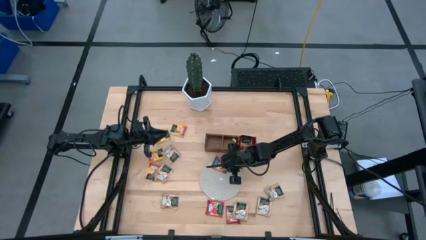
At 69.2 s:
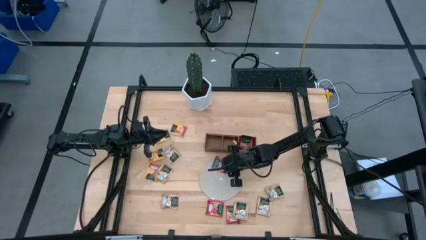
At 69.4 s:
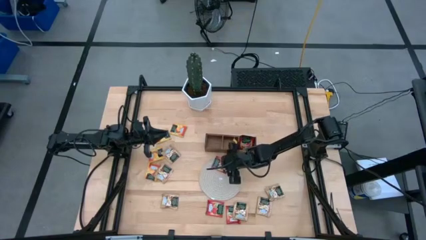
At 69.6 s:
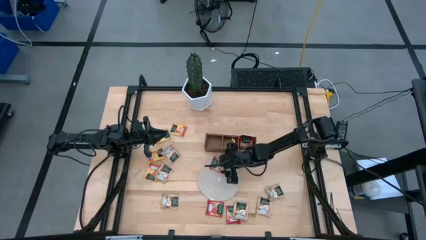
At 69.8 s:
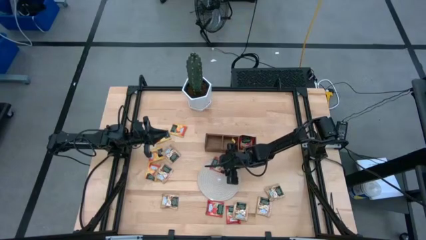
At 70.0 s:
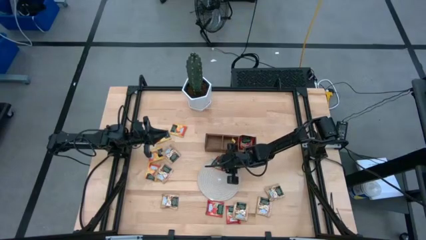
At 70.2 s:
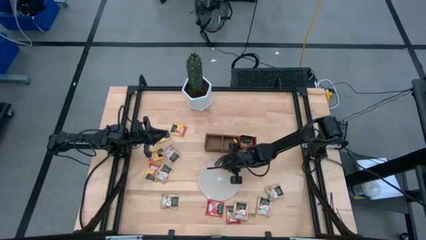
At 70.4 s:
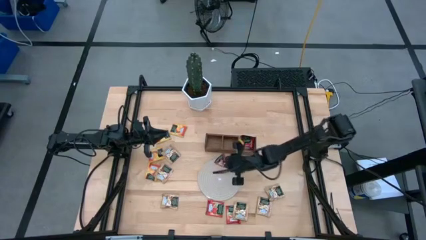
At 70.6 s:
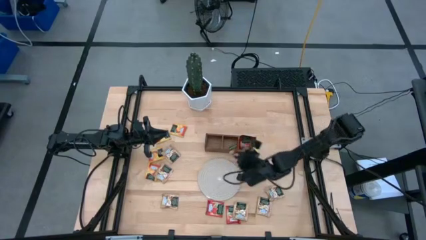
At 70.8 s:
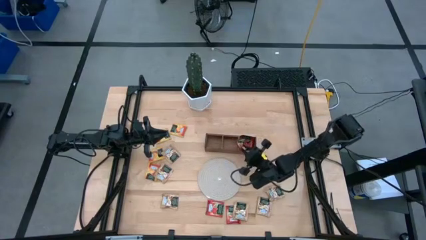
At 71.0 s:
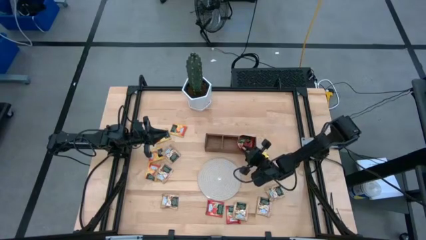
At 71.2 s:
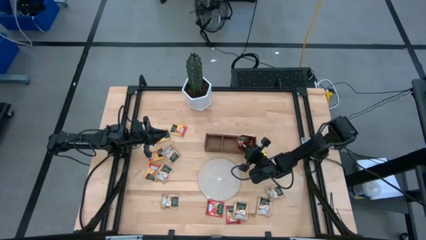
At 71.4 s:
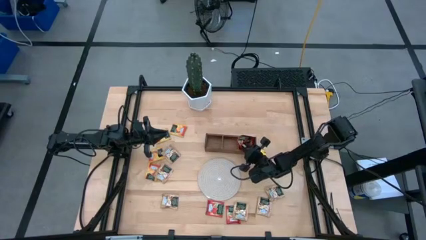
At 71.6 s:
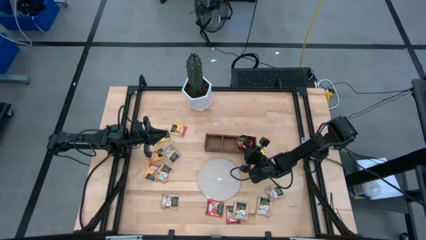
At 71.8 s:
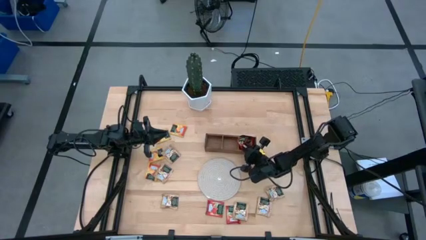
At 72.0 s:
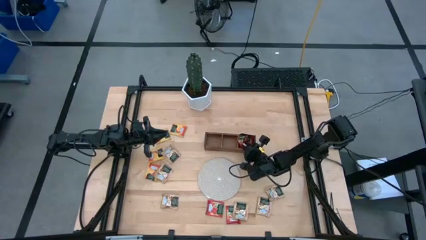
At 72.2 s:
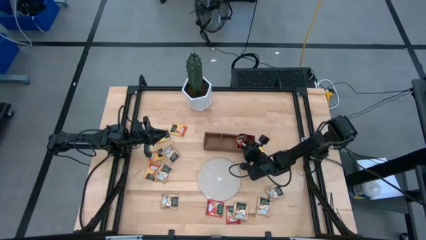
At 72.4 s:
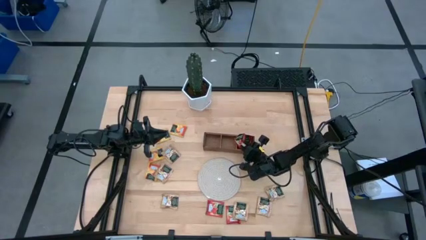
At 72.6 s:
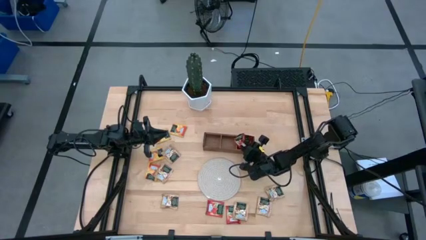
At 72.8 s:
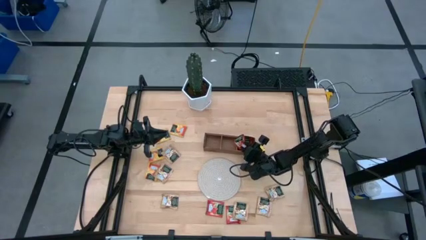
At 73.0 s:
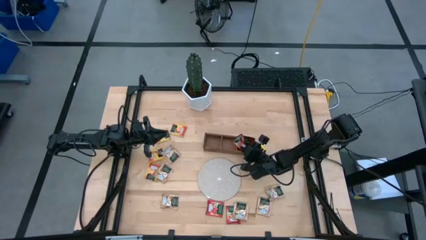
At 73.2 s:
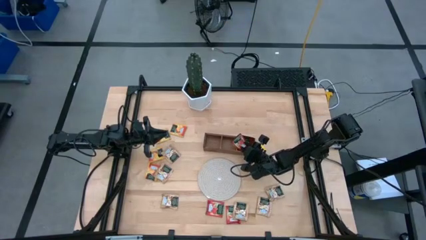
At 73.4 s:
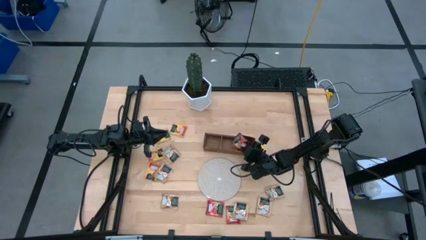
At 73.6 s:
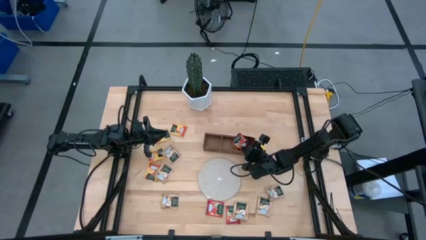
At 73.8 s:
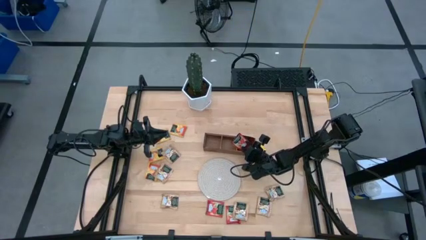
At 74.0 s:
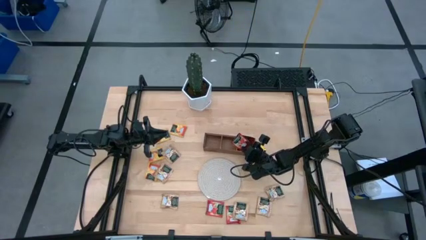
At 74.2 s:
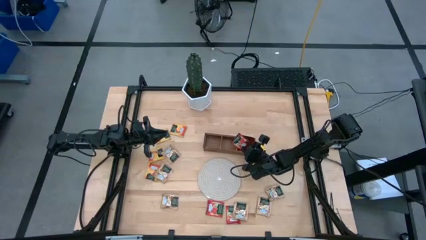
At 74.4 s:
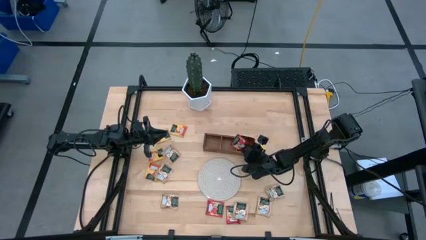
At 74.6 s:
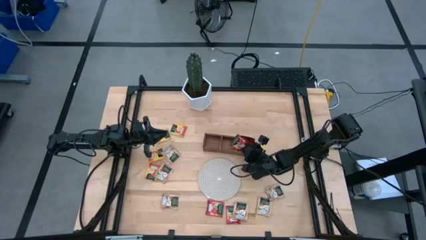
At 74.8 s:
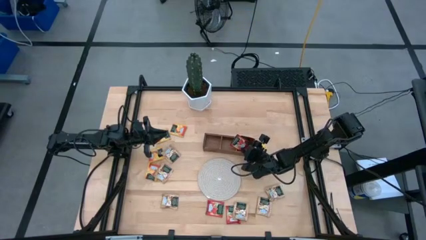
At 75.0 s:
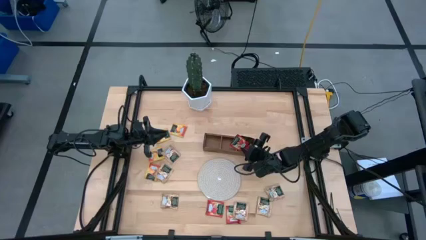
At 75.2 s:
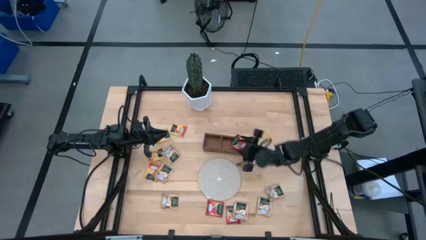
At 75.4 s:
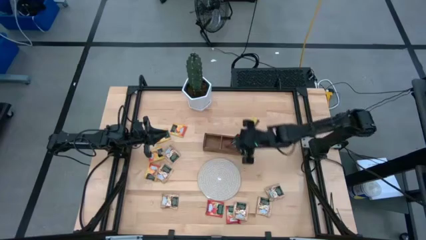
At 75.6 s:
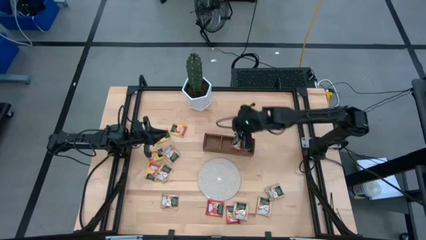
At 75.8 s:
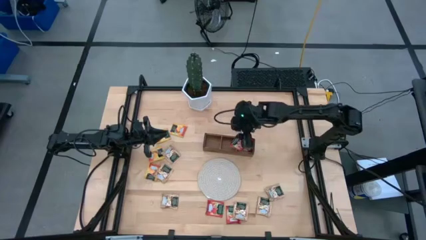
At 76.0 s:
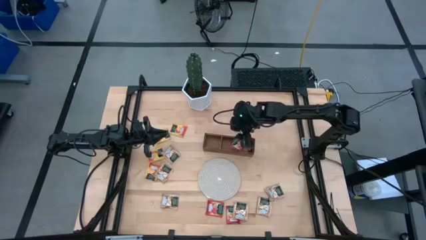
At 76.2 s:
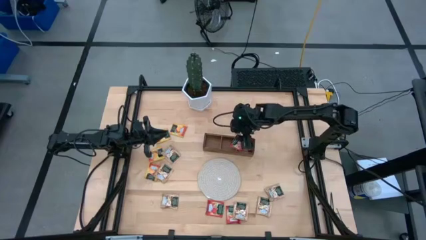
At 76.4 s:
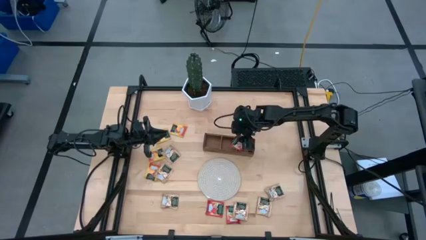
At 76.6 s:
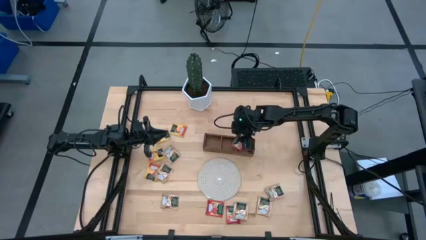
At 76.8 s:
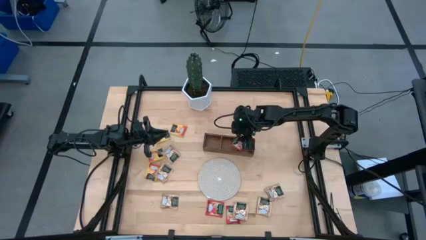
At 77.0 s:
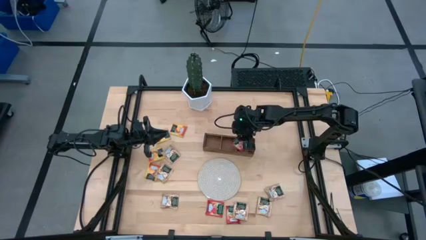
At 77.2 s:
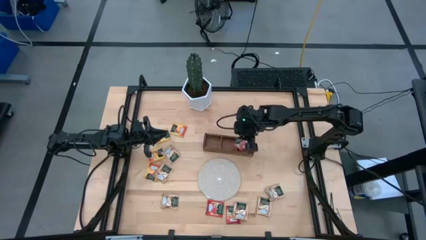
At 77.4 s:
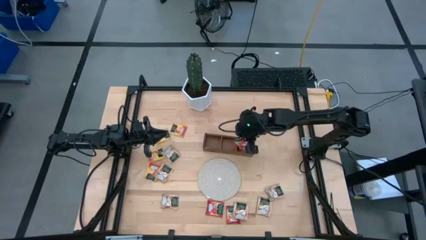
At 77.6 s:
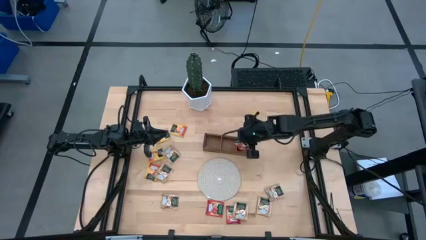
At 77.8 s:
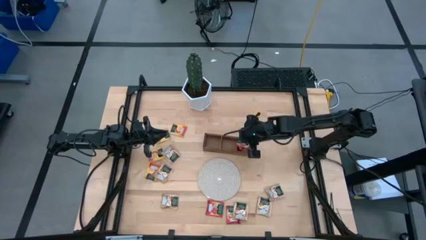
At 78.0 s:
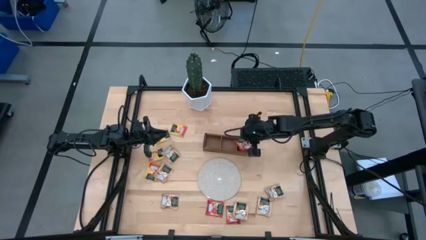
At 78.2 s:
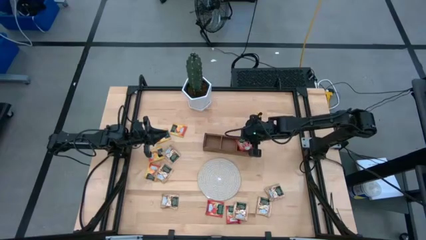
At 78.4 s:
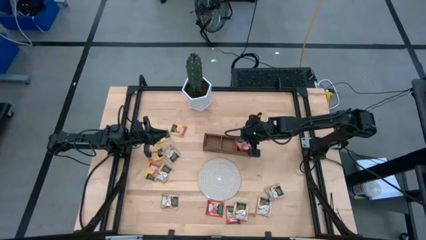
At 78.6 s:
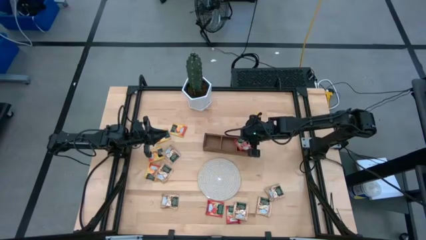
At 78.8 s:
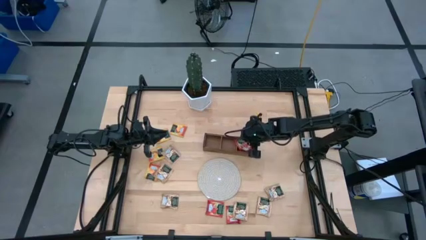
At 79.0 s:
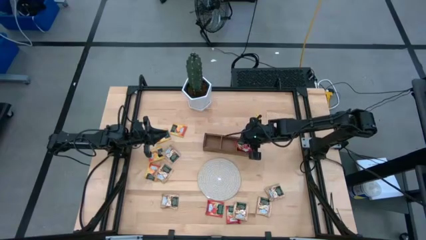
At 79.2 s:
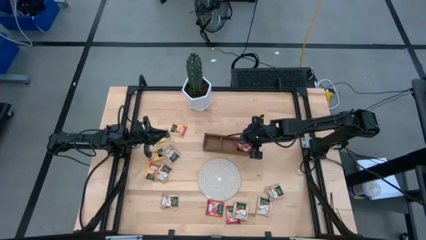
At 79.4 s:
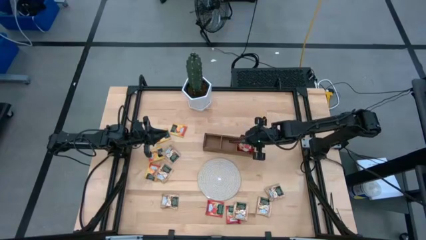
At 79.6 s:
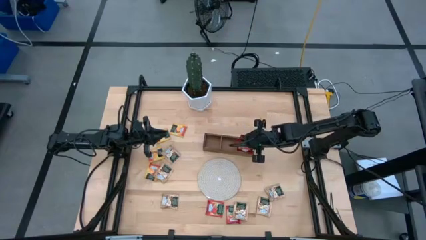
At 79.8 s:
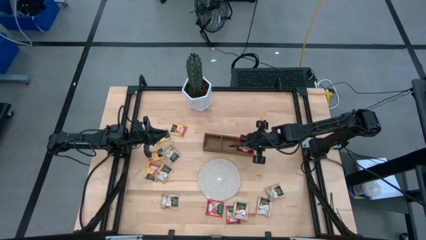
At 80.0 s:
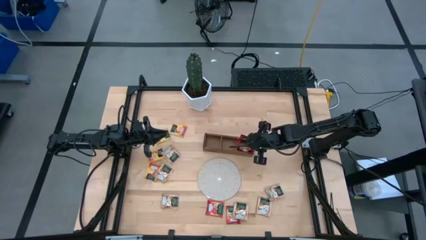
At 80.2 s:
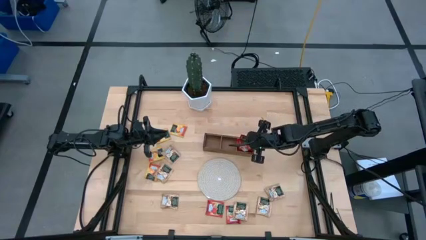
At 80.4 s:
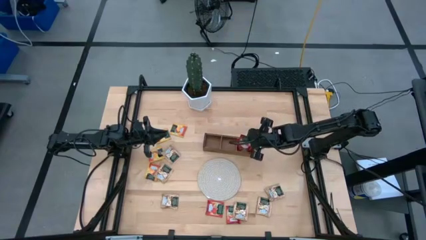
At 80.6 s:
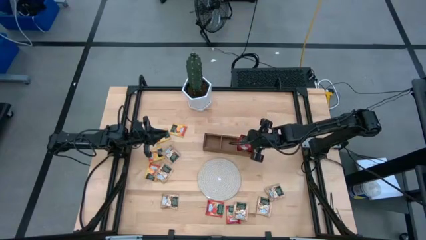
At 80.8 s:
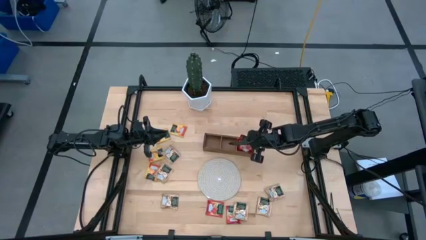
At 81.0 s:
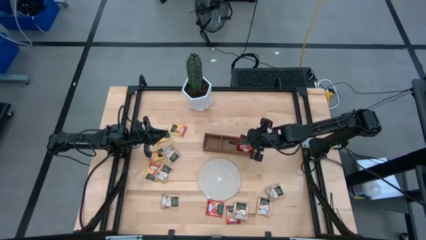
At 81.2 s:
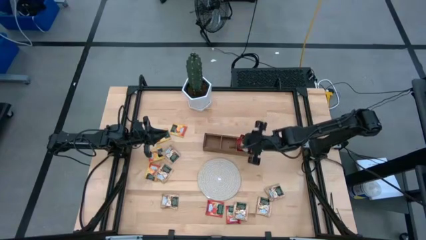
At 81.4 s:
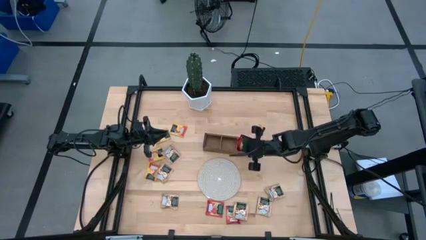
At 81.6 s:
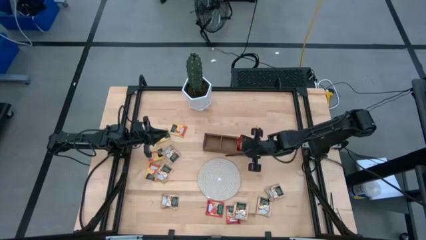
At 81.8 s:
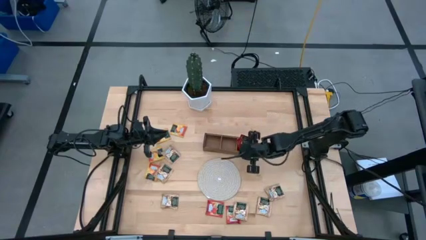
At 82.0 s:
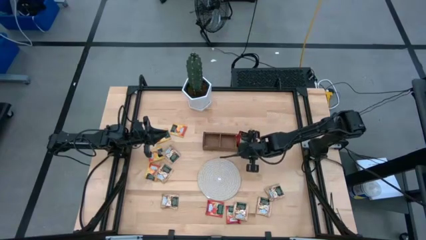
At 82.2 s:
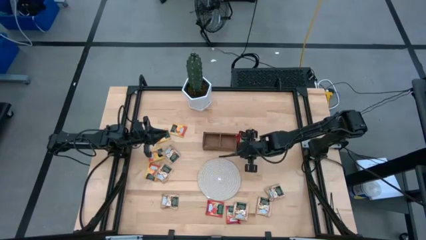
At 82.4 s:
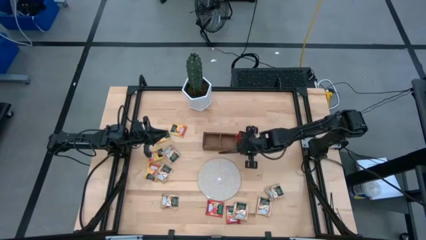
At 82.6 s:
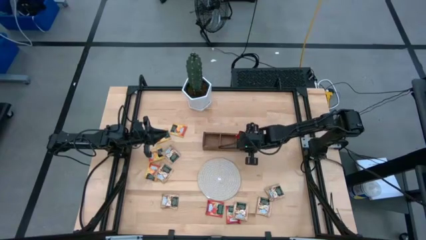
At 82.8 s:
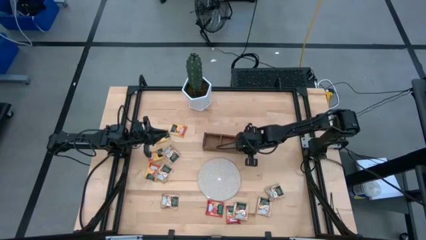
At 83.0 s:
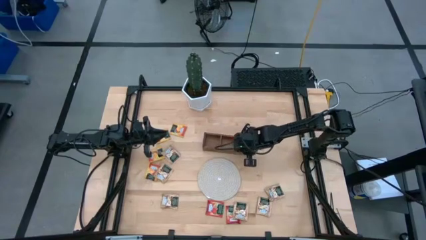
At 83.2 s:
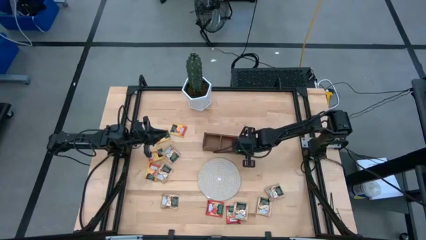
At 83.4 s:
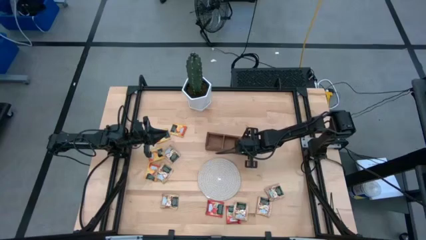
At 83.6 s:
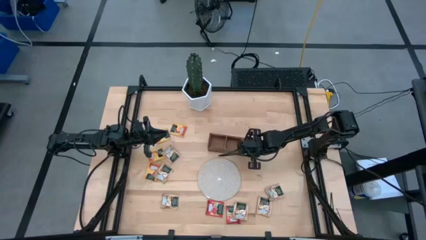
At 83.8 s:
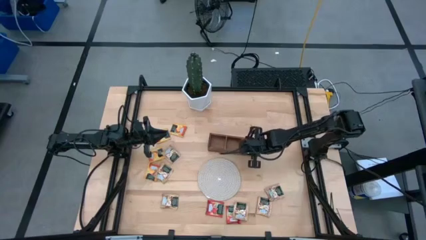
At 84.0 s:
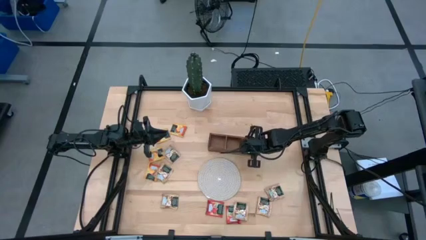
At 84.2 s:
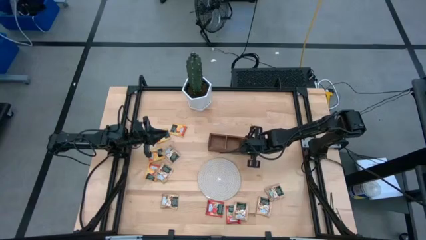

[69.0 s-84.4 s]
Task: Pick & Place Tea
Put the red tea bag into the right section of the wooden organizer

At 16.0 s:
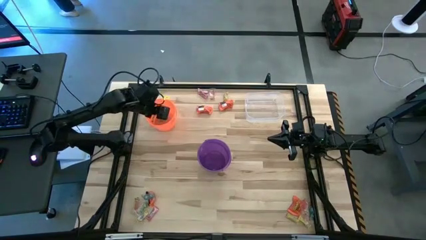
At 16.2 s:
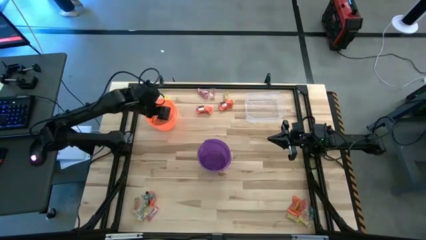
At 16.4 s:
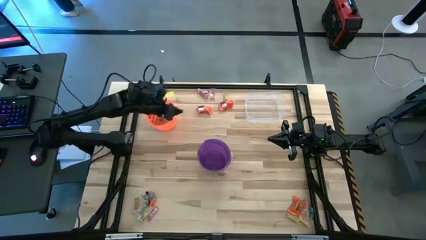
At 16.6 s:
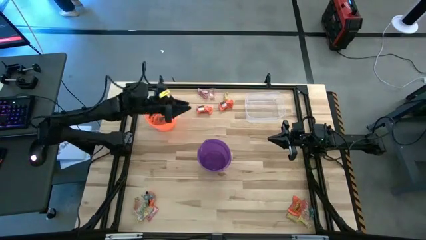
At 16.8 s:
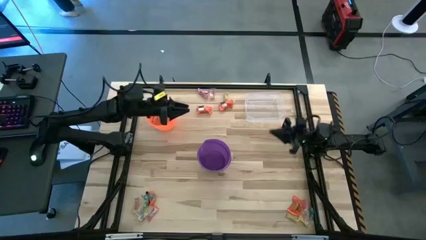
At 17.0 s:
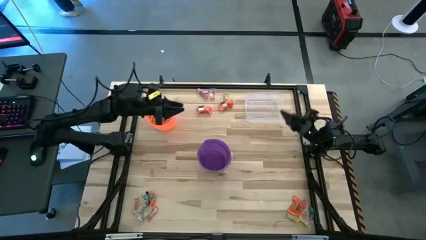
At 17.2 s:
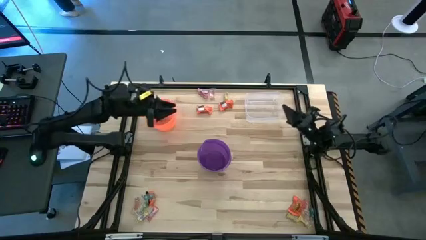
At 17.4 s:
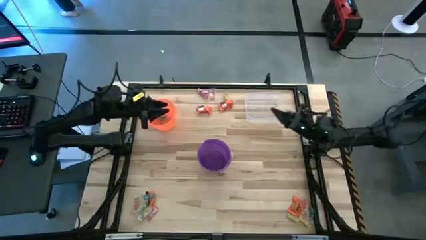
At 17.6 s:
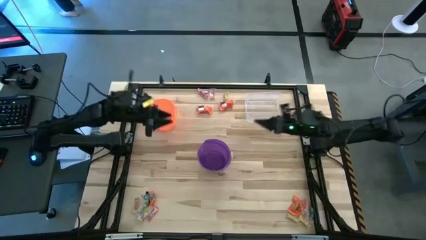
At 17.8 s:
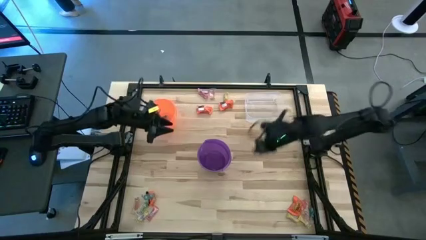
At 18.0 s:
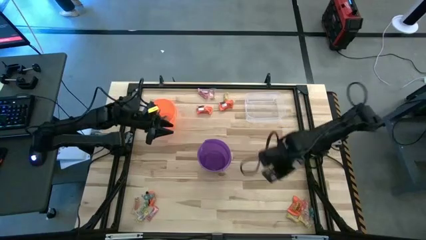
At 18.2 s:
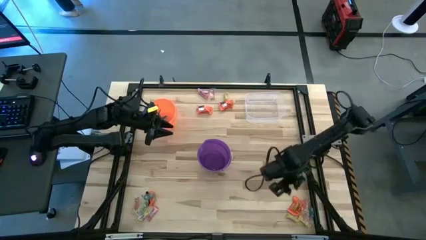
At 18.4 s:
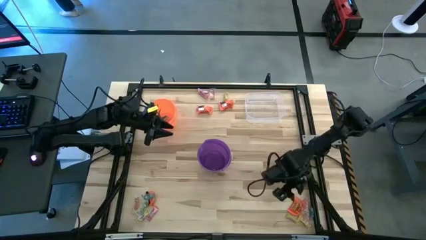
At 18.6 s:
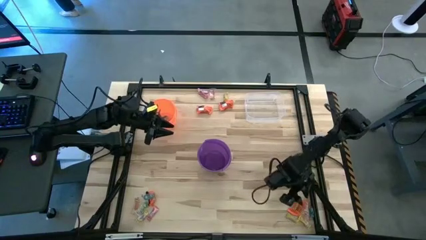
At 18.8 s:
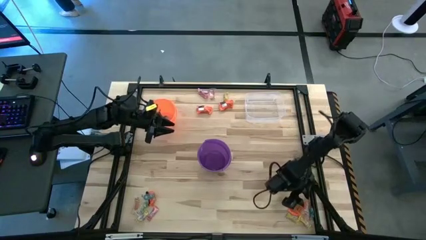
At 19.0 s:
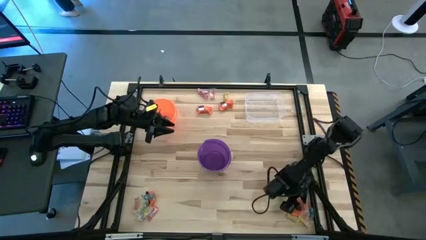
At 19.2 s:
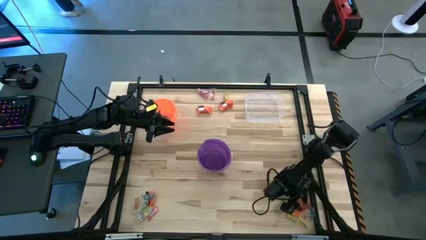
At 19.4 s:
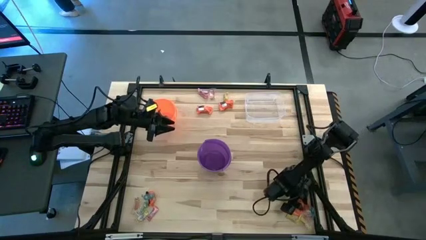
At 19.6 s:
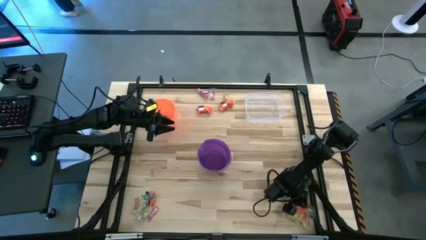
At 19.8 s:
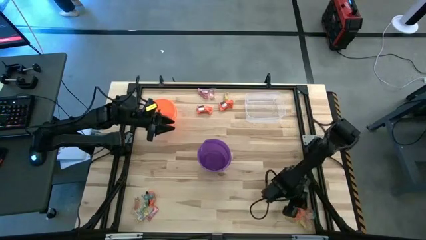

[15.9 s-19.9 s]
Task: Sort candy by brand, put in halloween buckets
Put the orange gummy into the orange bucket
